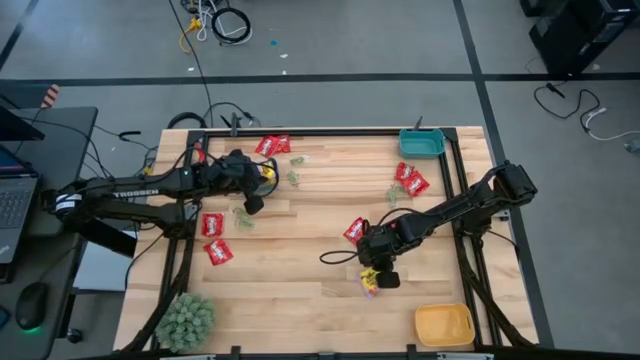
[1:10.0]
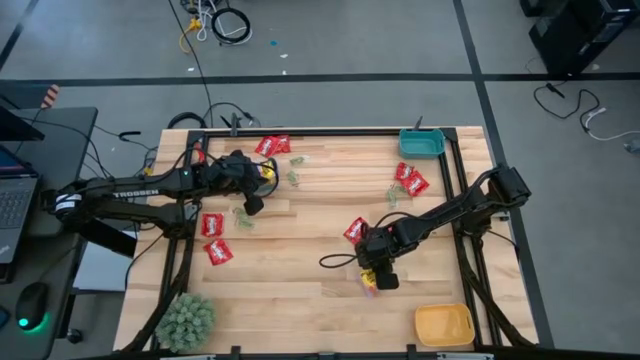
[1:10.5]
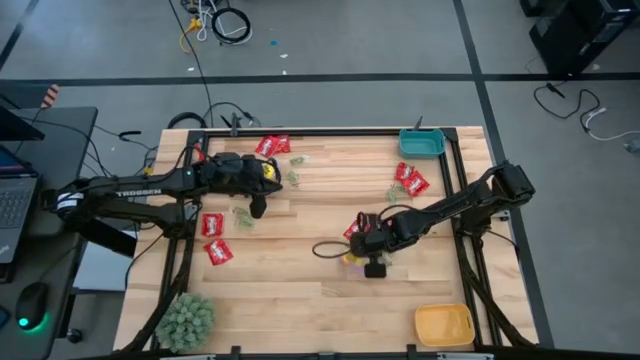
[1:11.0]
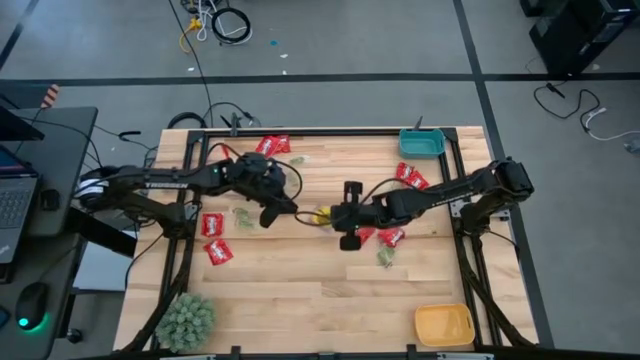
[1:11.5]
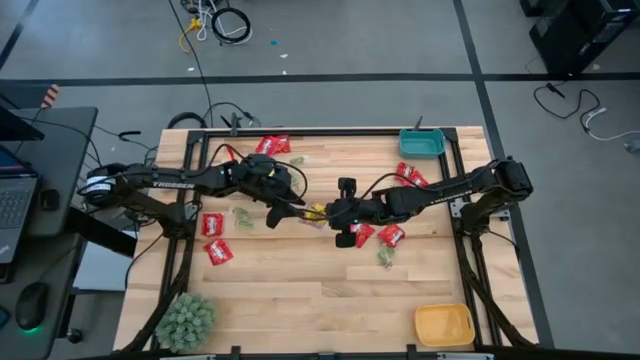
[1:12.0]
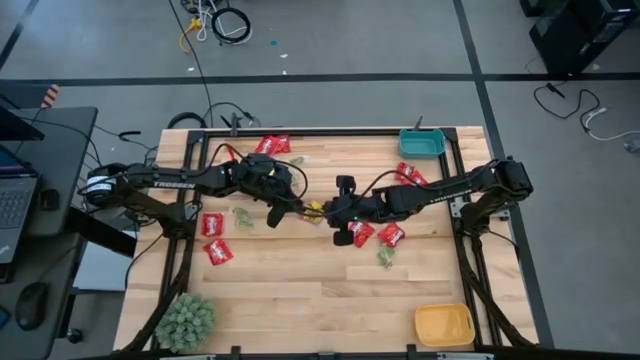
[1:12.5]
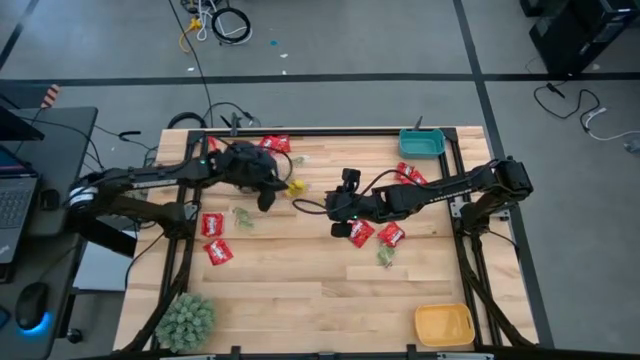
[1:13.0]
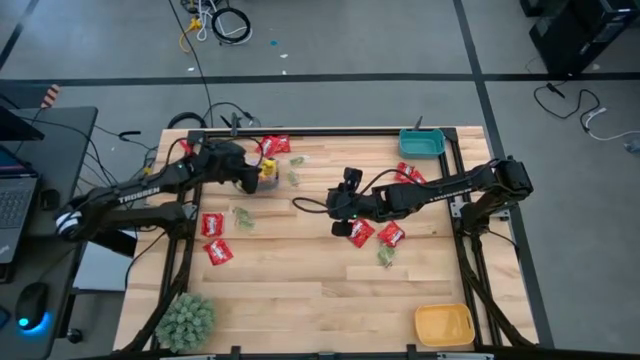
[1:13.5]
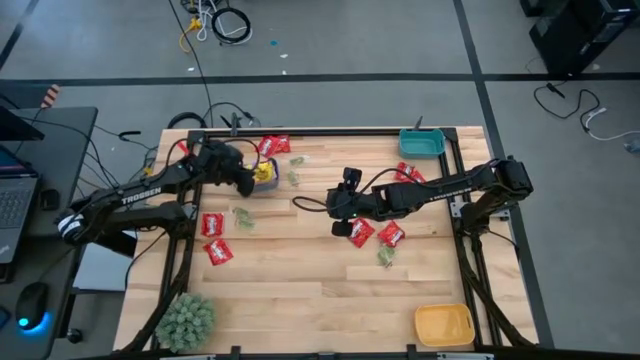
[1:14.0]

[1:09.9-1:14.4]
Task: Sort candy
Put the yellow candy into the dark blue bin

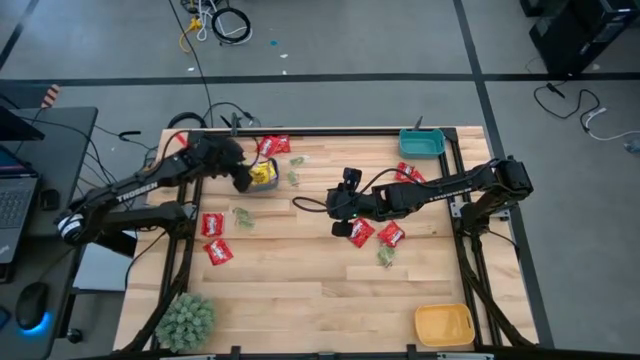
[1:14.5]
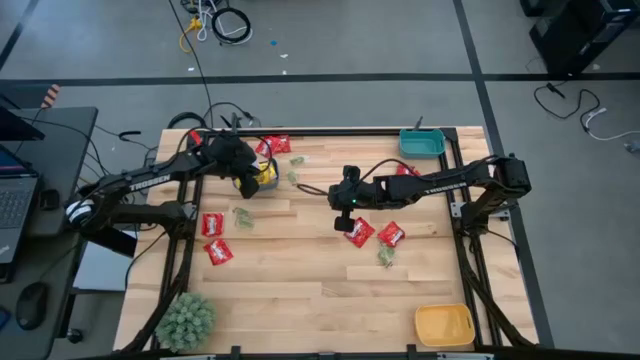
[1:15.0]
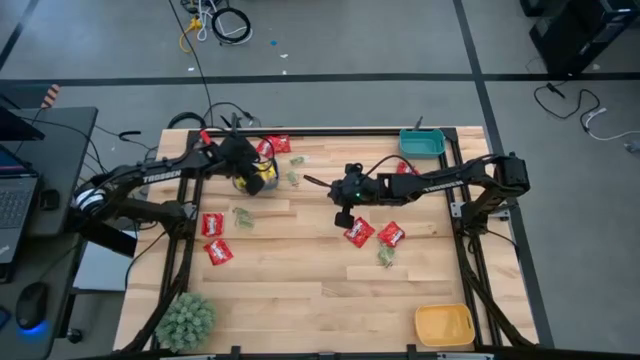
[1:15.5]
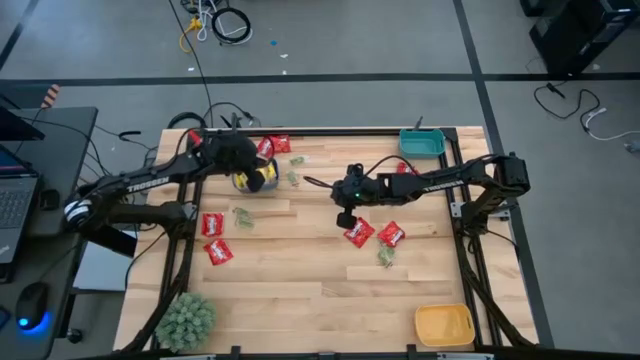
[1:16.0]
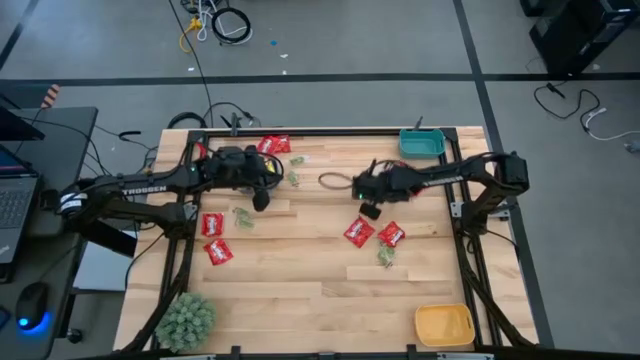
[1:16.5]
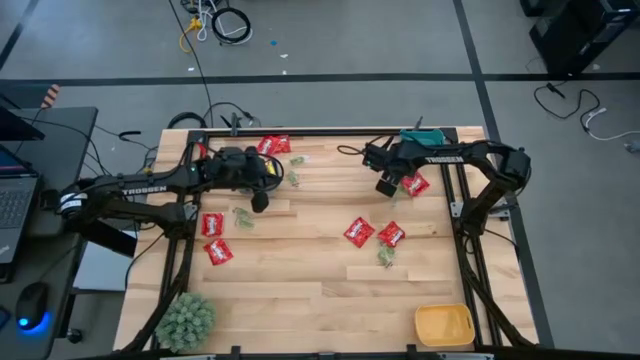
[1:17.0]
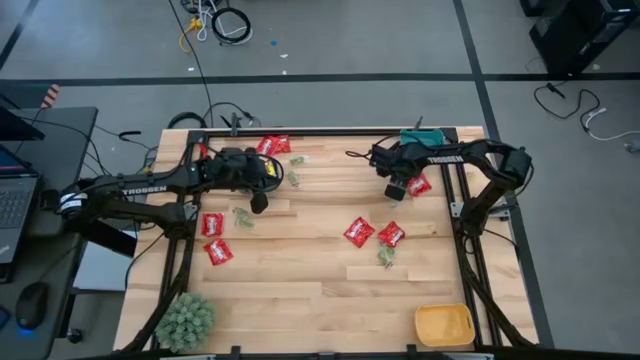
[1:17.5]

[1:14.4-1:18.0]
Put the red candy into the blue bin

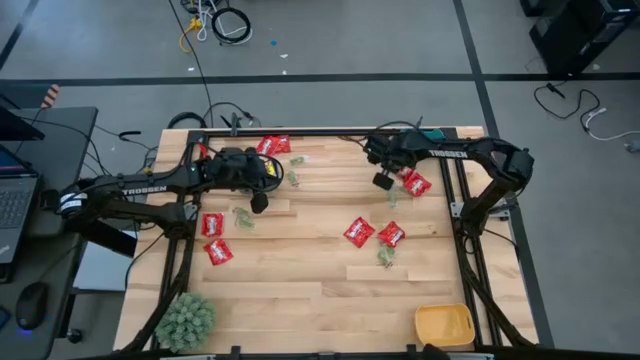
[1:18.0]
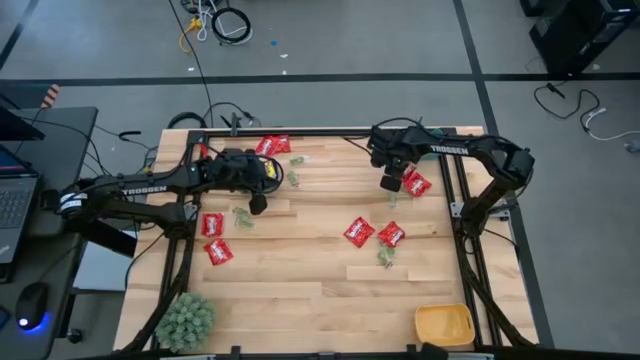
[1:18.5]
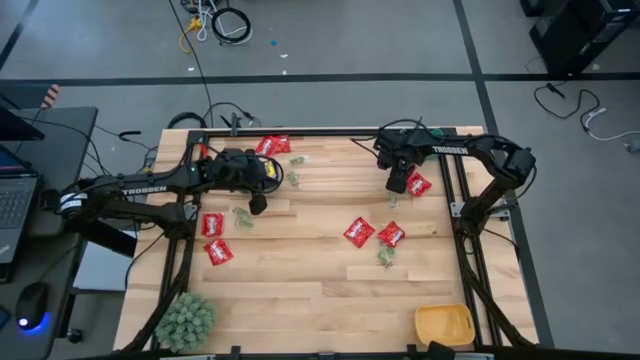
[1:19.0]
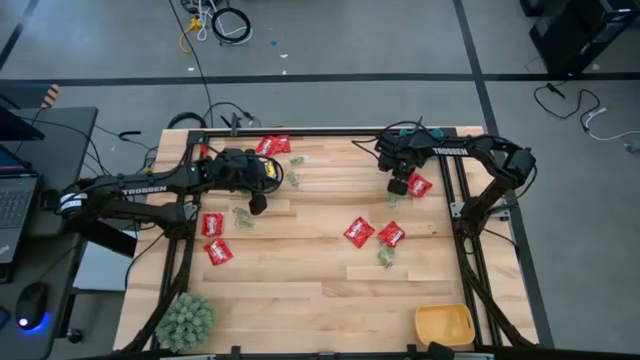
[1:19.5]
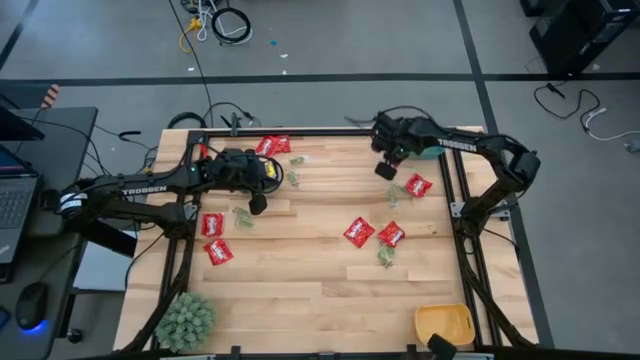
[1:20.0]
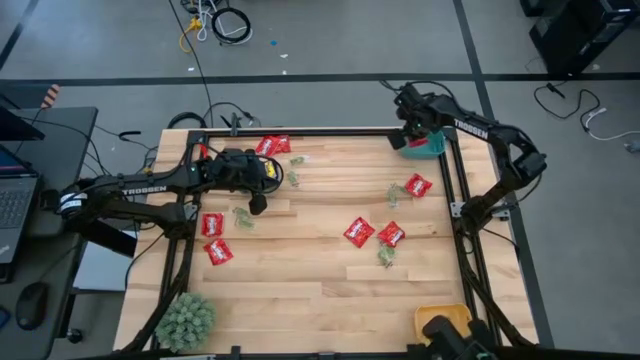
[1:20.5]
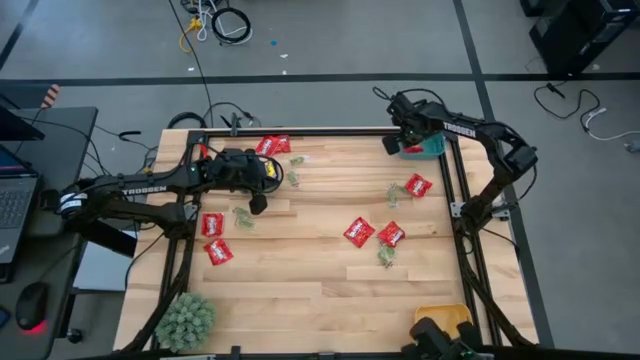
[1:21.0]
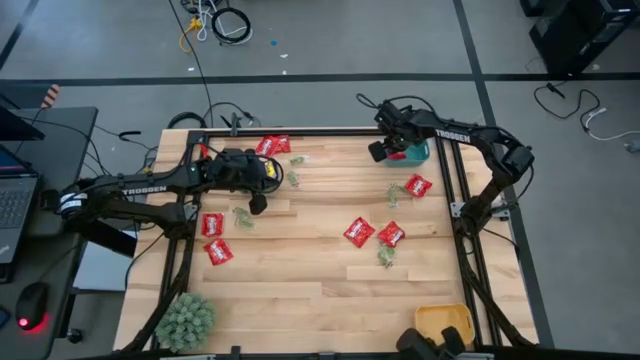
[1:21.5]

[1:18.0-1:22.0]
Put the red candy into the blue bin

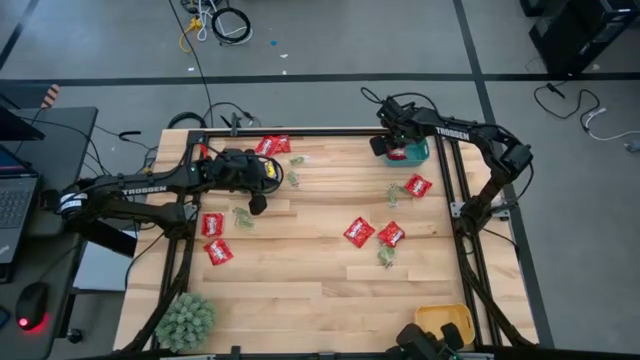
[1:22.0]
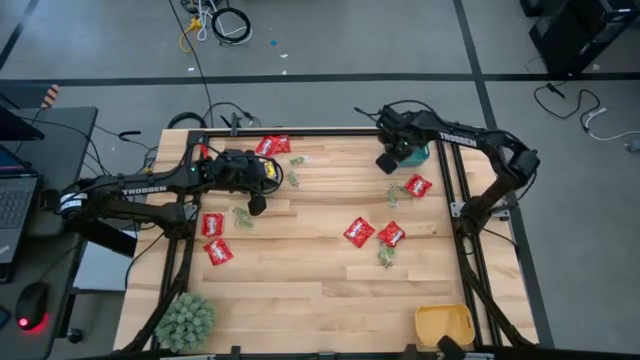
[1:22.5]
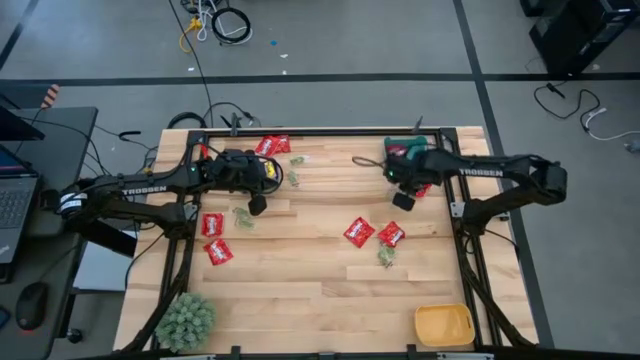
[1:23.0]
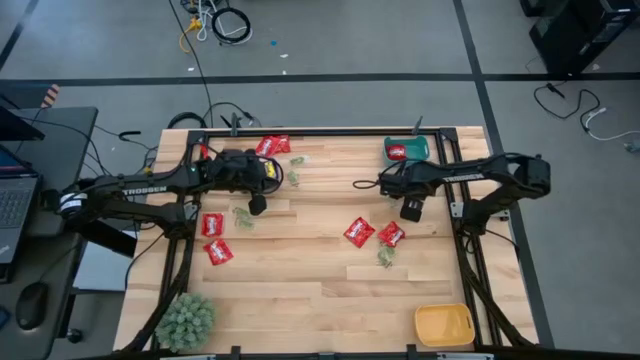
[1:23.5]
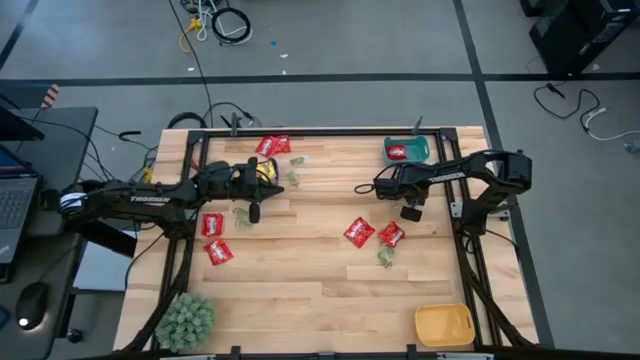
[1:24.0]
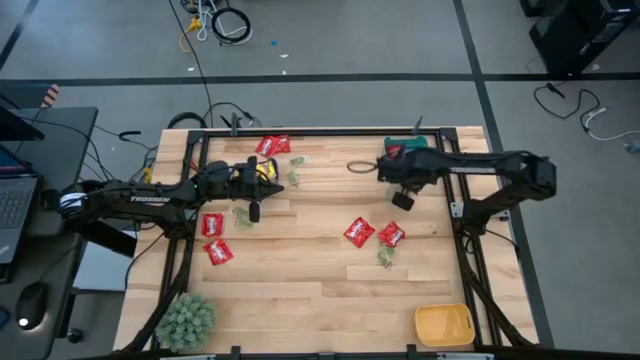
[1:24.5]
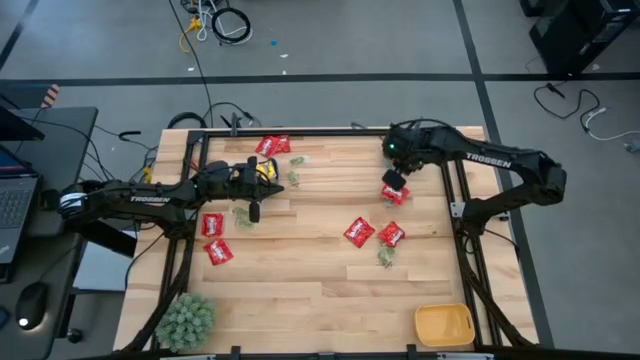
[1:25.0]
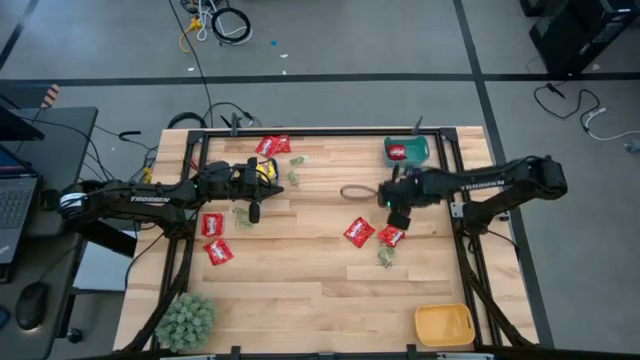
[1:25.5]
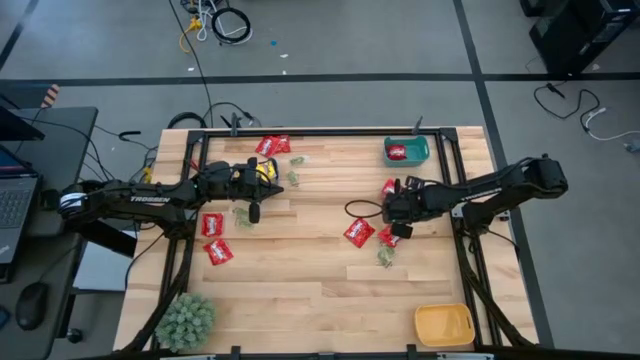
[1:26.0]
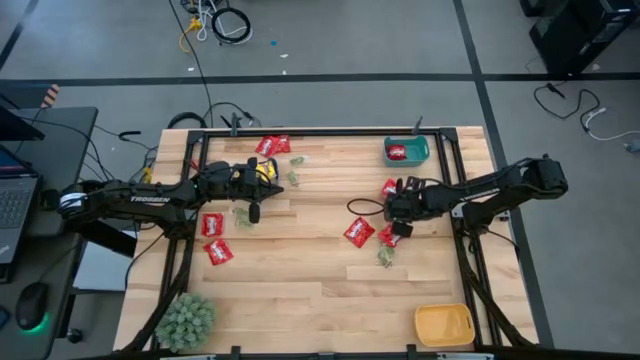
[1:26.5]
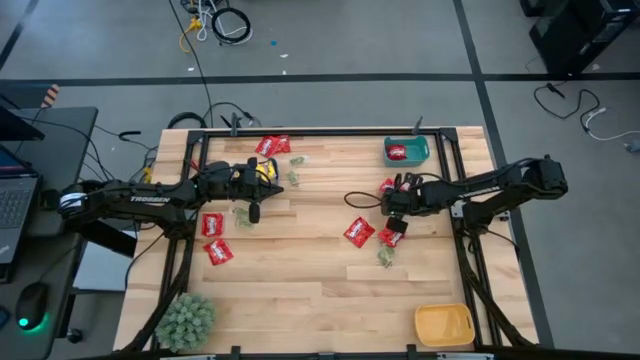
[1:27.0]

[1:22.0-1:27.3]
Put the red candy into the blue bin

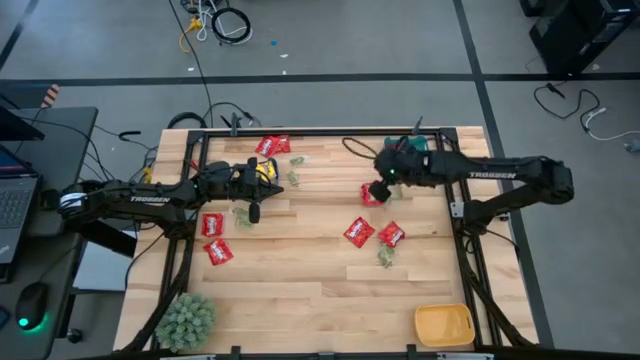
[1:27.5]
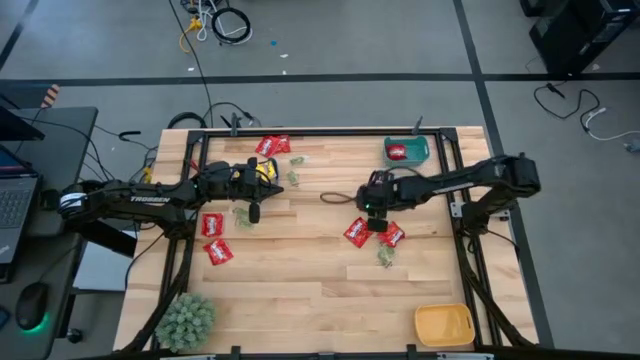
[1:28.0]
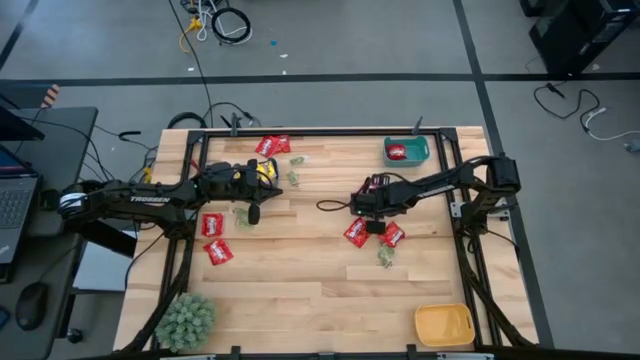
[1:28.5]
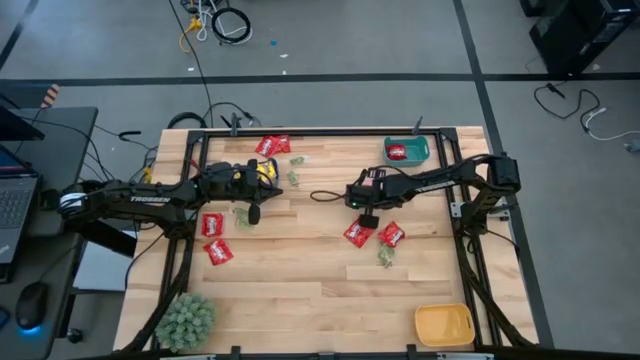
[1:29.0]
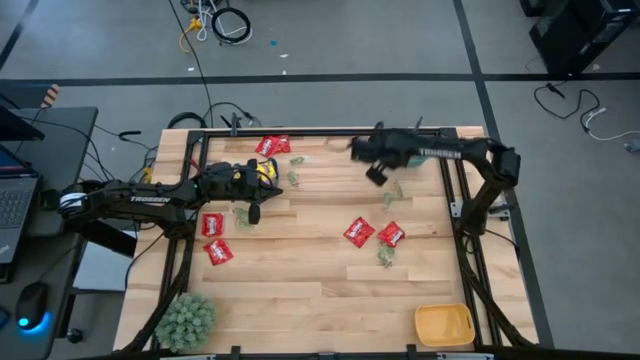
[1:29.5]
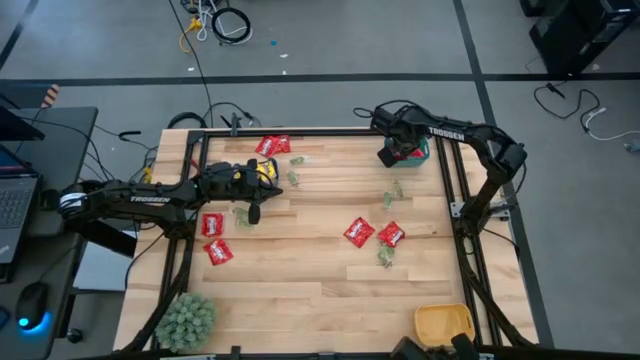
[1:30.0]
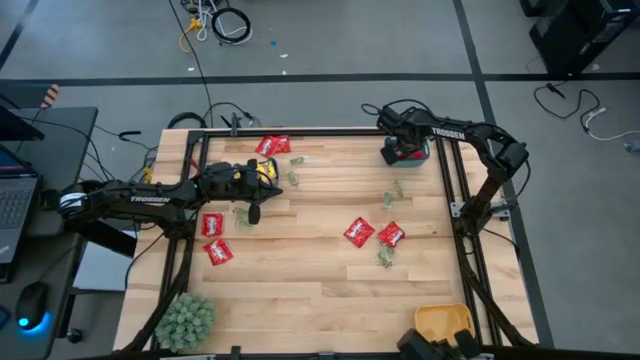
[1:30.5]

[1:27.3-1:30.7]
Put the red candy into the blue bin

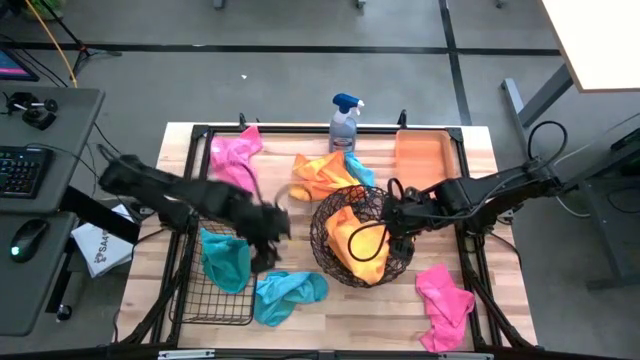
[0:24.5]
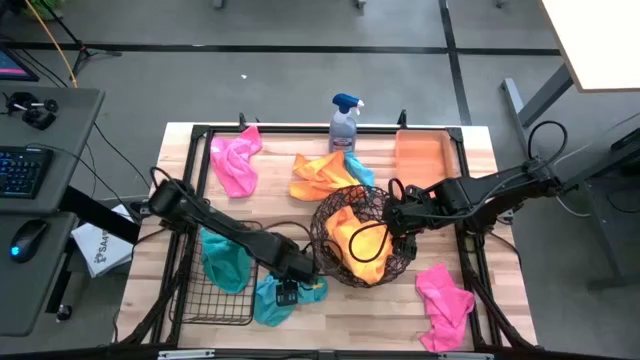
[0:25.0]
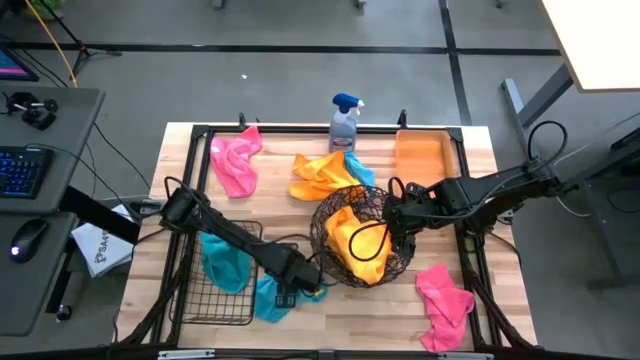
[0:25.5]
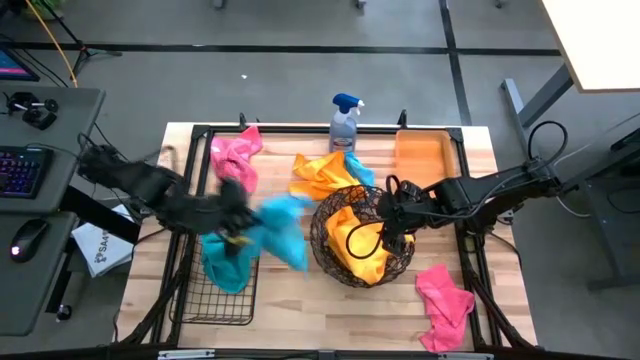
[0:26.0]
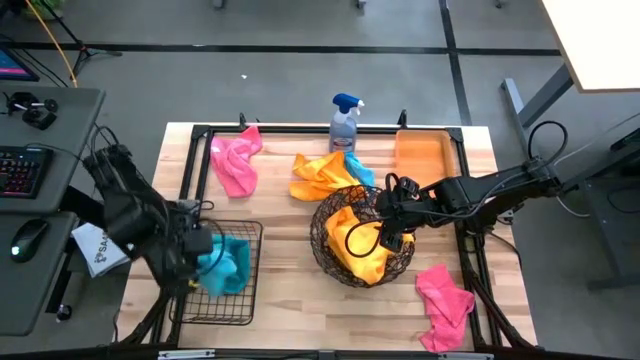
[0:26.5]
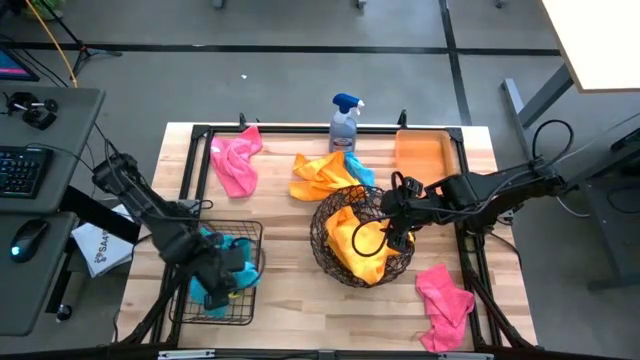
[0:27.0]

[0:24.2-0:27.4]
Task: Sort microfiber towel by color & place in baskets
Put the bottom blue microfiber towel into the wire basket
